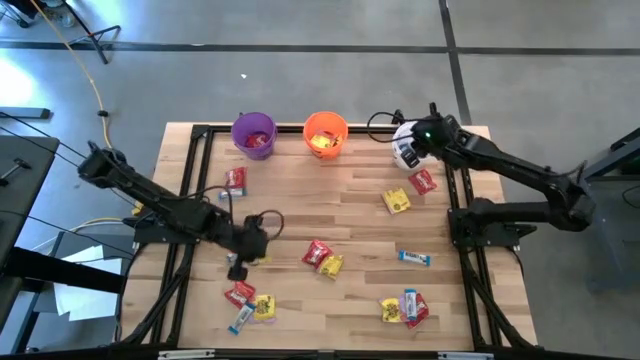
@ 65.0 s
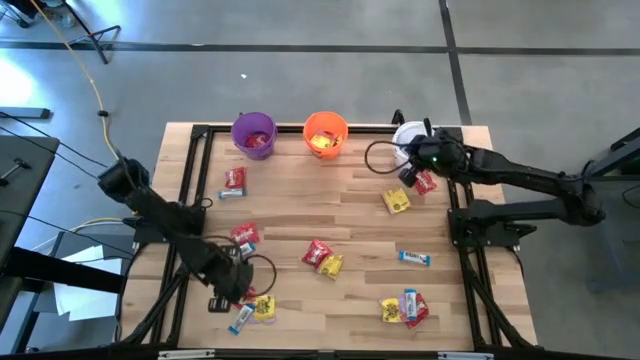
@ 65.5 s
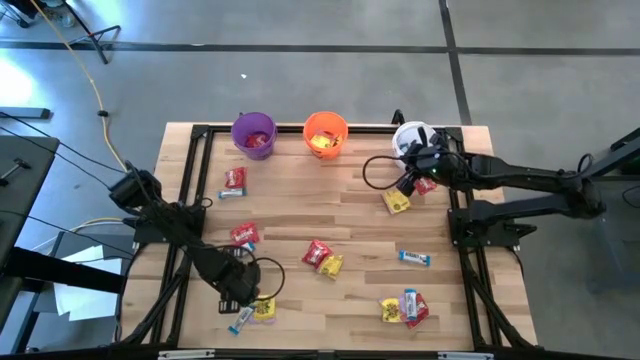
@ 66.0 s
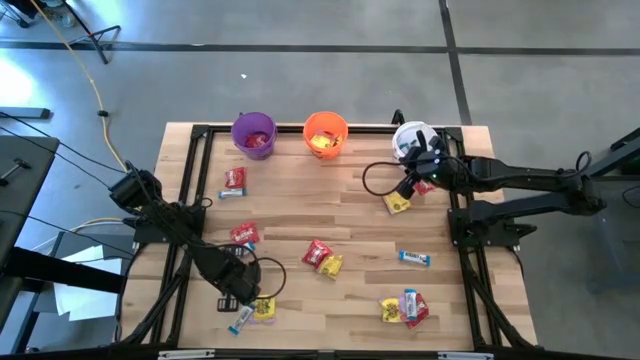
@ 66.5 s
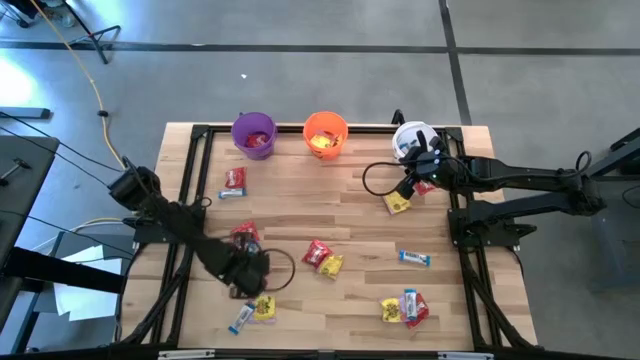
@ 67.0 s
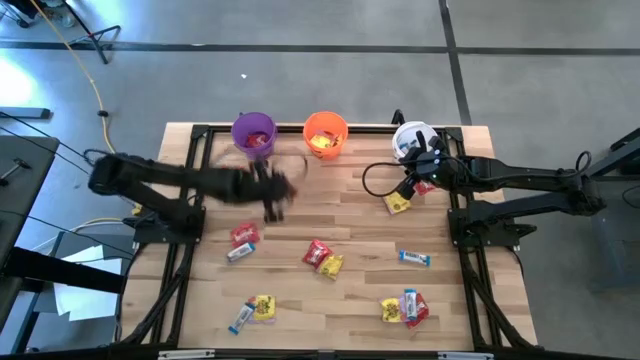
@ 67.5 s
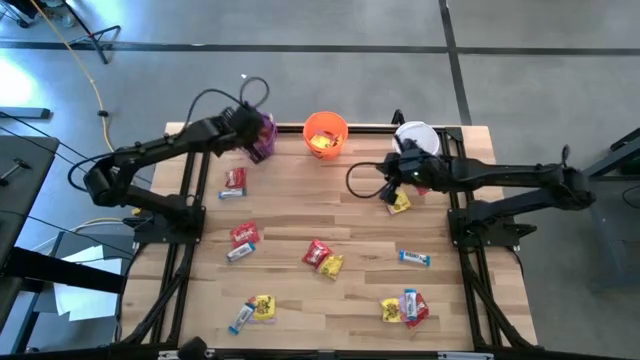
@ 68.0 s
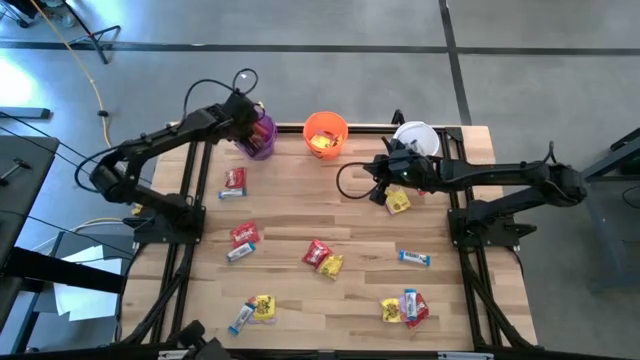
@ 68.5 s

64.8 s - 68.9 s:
Task: Sort candy
Put the red candy into the violet bucket

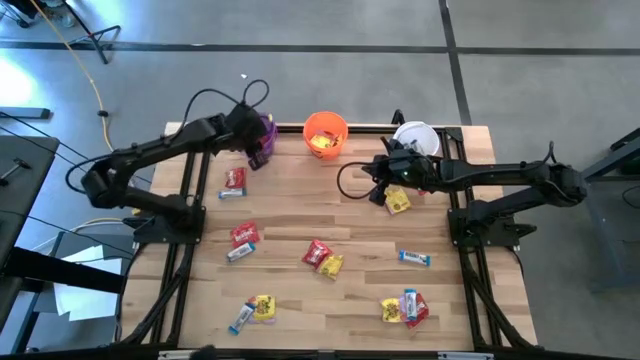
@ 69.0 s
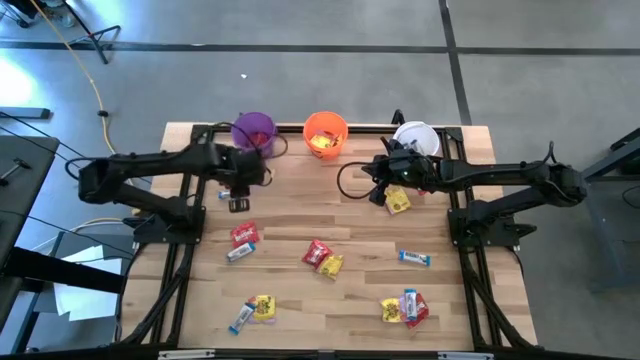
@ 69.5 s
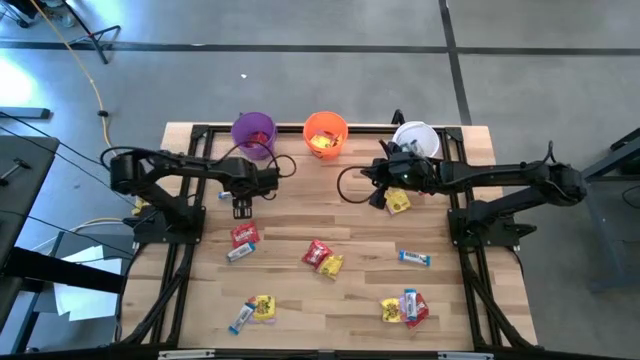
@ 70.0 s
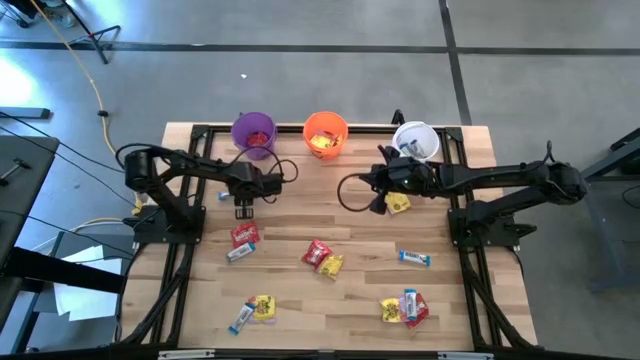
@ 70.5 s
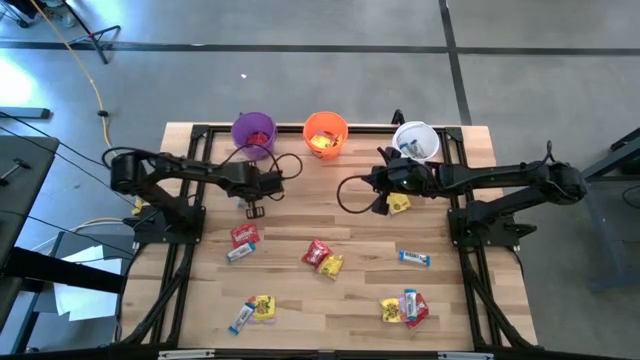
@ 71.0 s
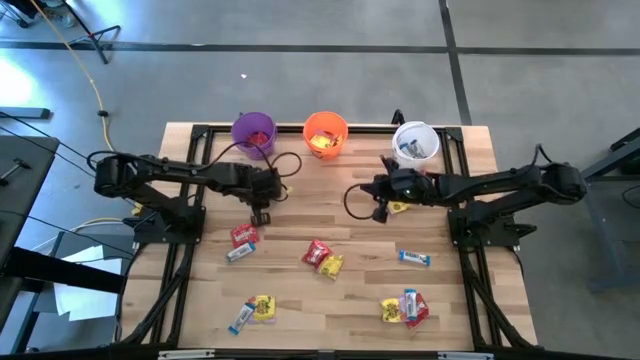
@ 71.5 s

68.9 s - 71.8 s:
Put the white chocolate bar into the white bucket

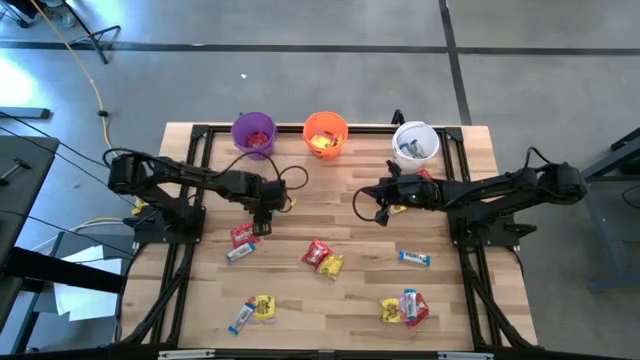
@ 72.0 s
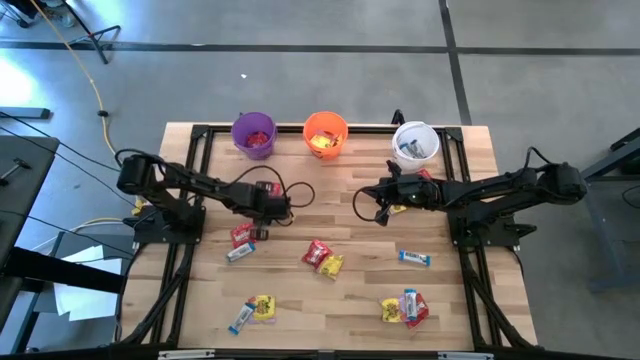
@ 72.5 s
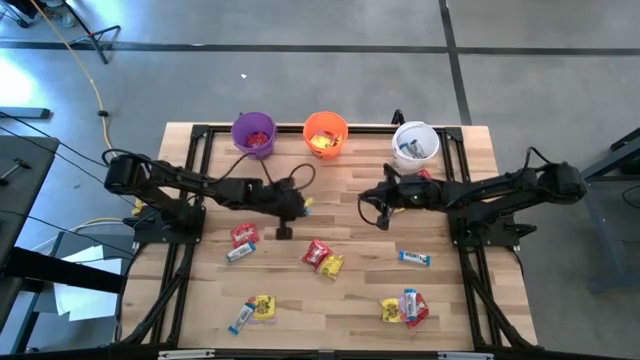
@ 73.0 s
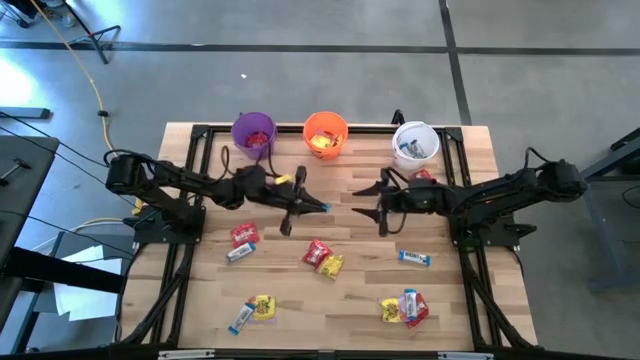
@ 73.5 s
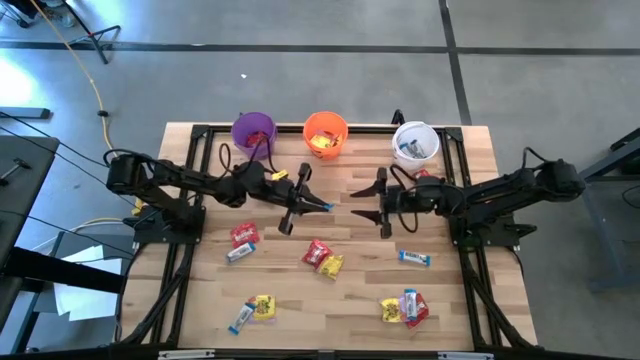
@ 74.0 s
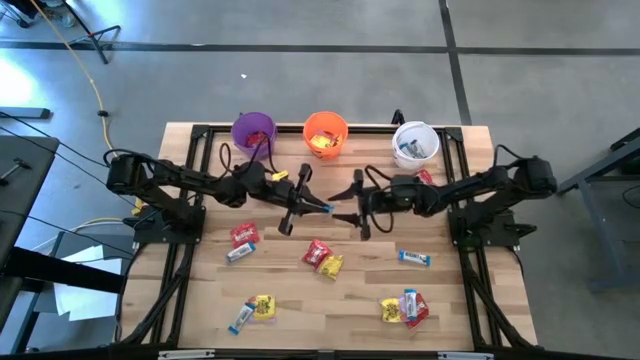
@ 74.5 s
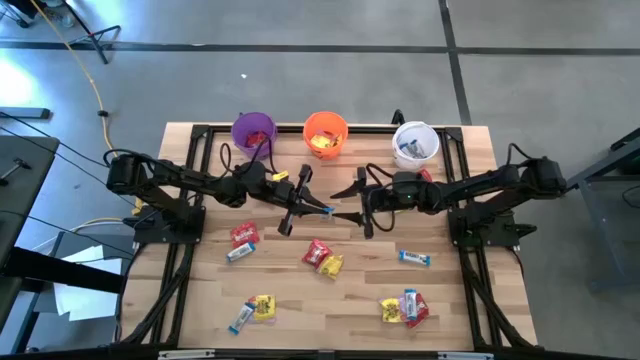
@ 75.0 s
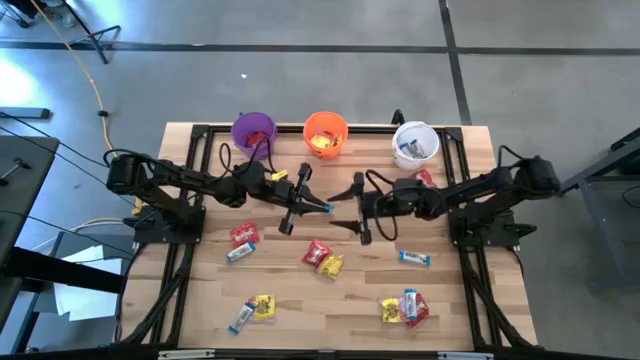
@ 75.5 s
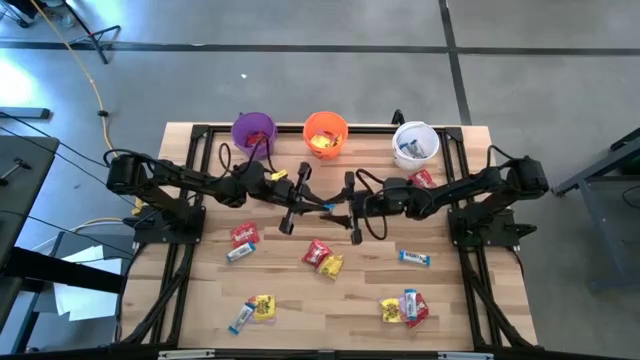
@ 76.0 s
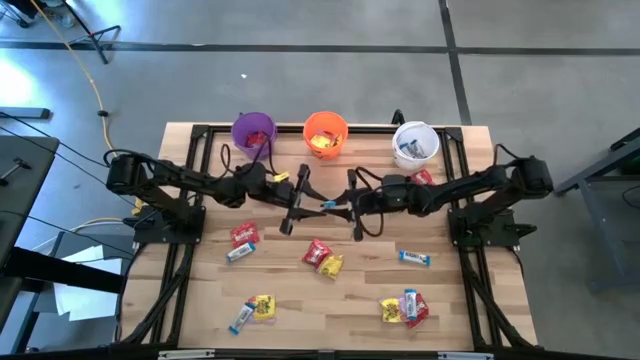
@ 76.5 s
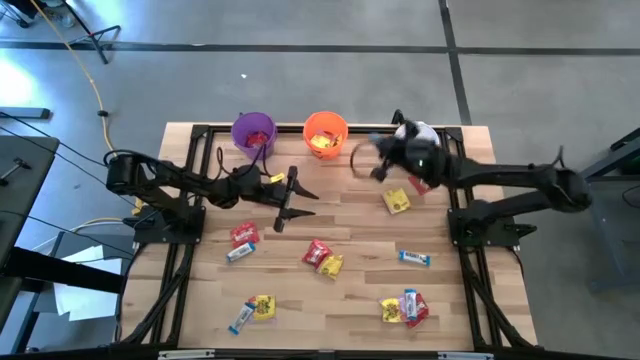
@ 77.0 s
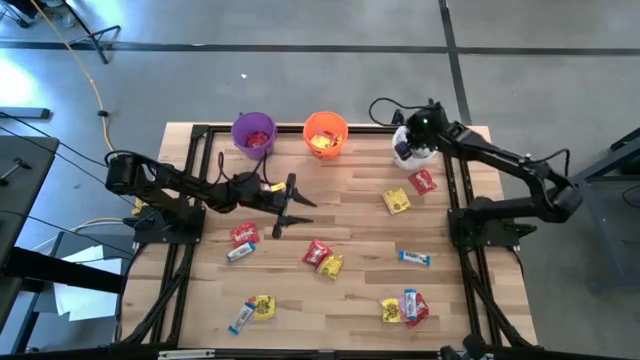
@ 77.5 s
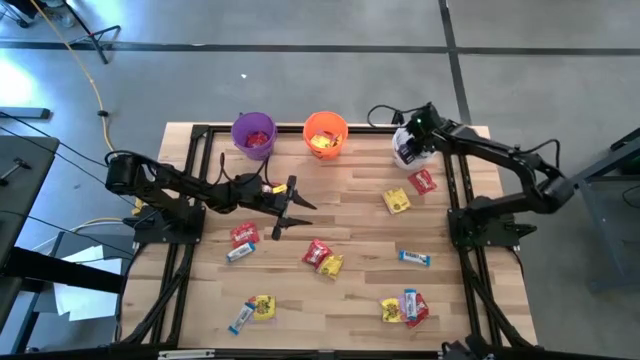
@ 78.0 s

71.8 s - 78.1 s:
Put the white chocolate bar into the white bucket

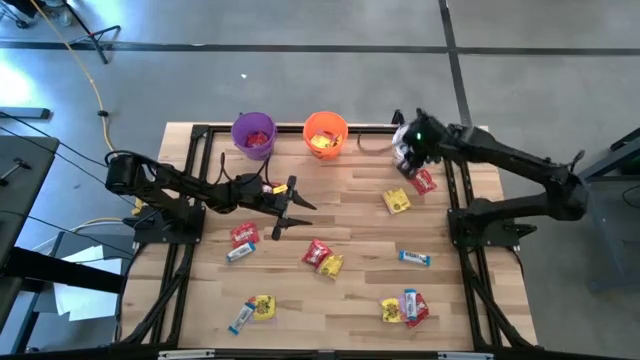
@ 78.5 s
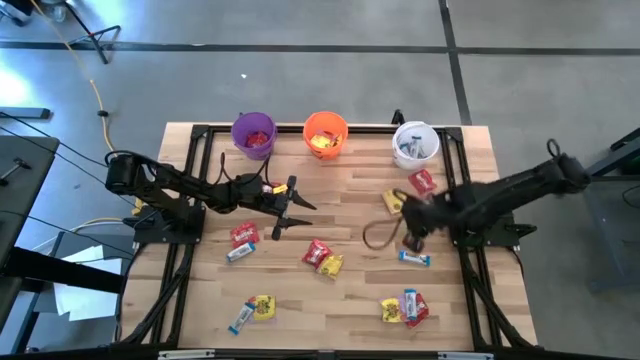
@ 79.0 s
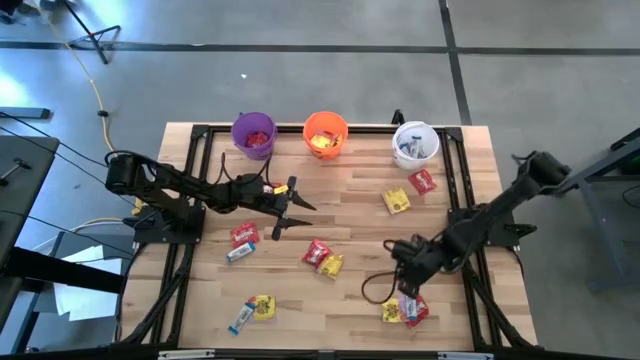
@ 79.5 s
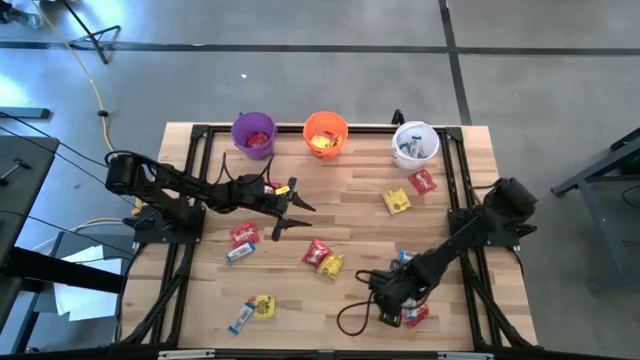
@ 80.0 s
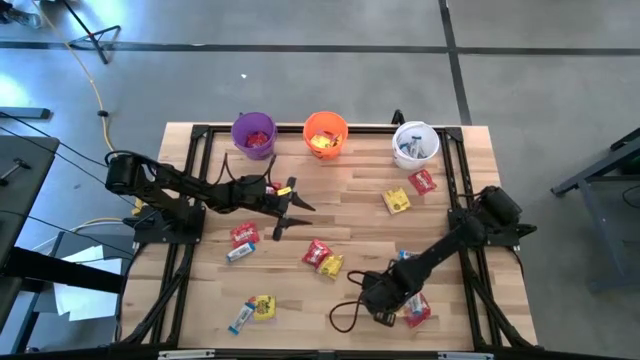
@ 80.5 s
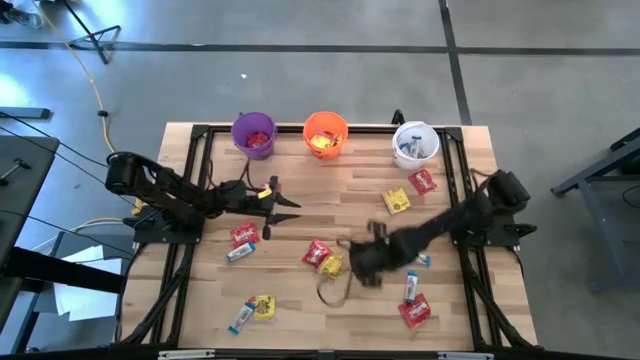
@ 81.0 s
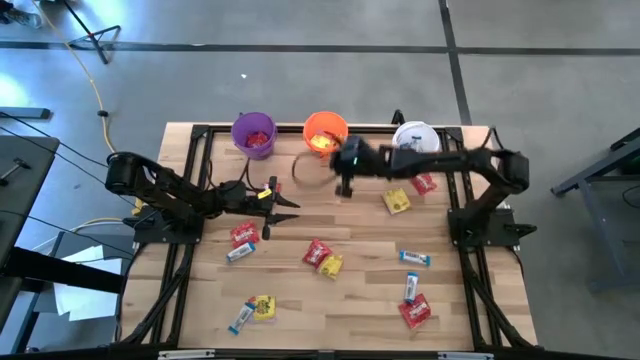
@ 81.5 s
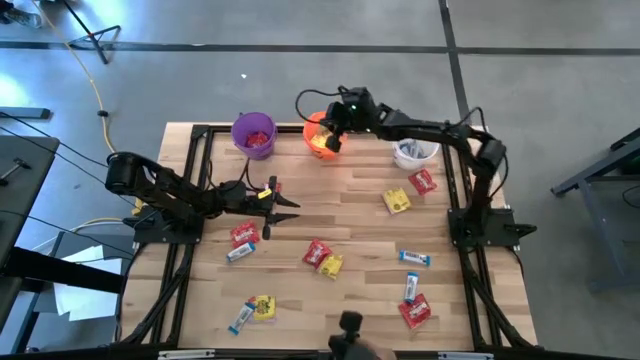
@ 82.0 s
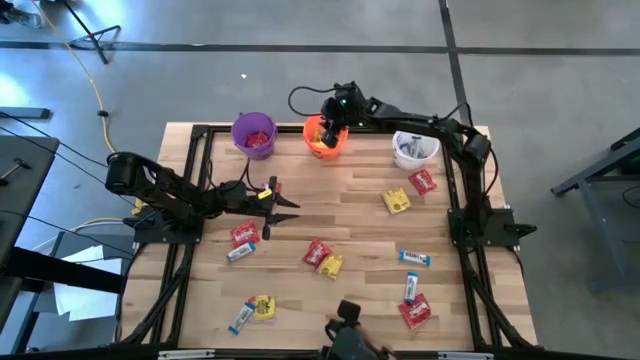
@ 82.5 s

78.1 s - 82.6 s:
Put the yellow candy into the orange bucket

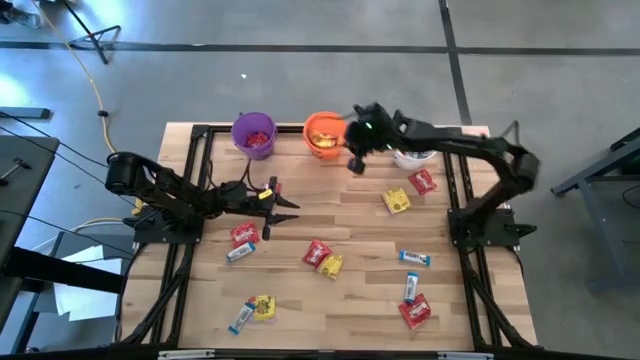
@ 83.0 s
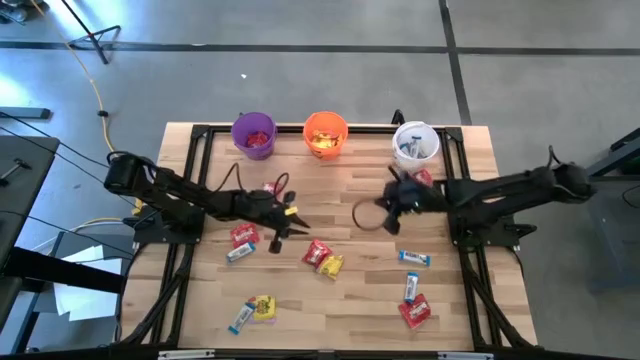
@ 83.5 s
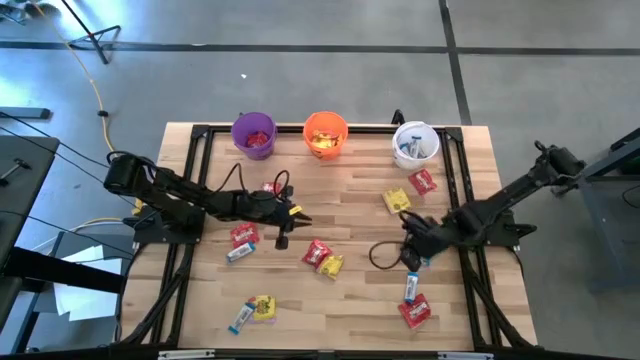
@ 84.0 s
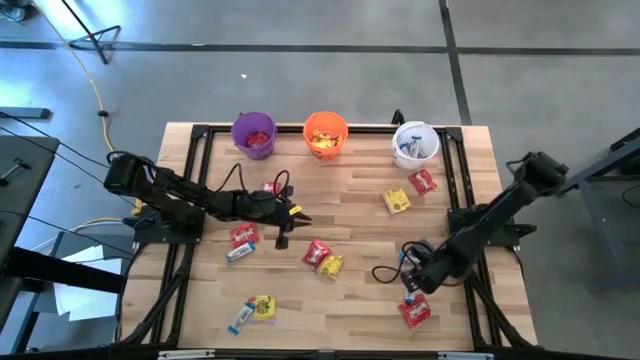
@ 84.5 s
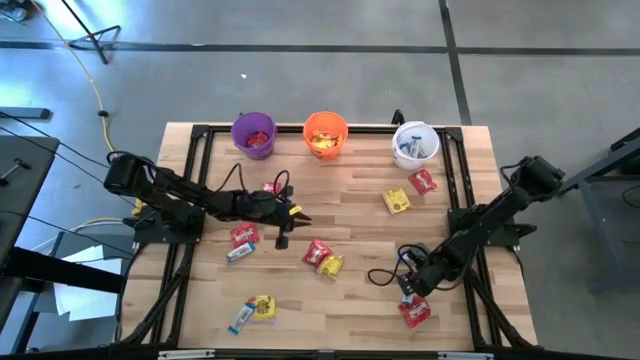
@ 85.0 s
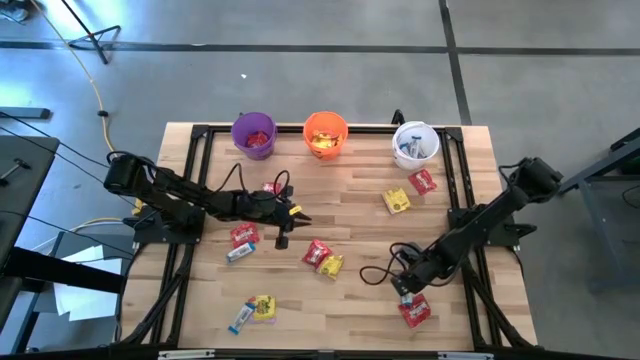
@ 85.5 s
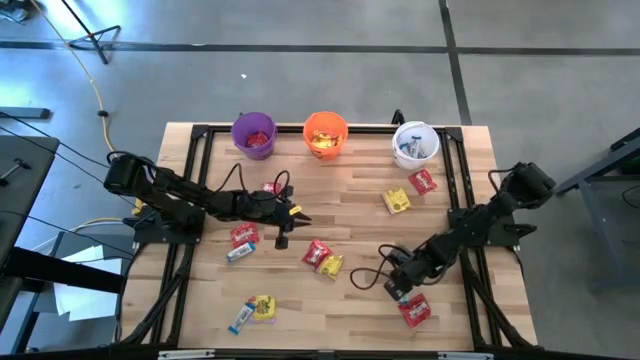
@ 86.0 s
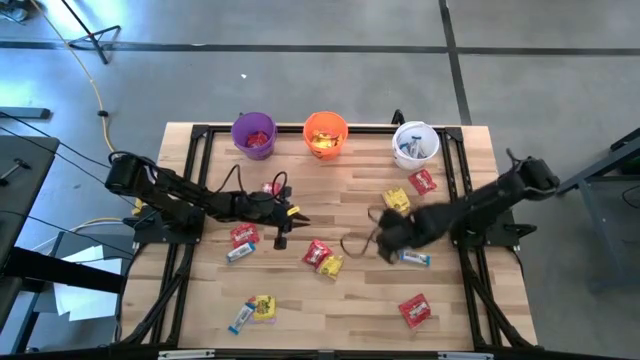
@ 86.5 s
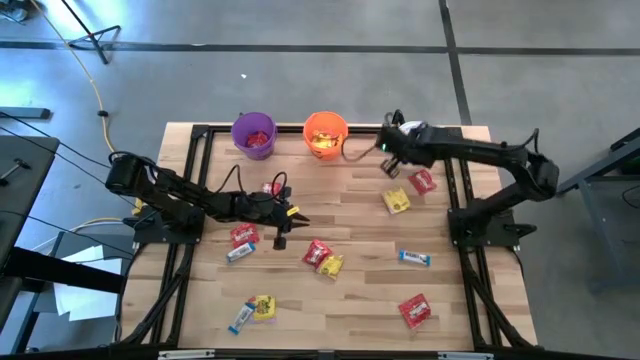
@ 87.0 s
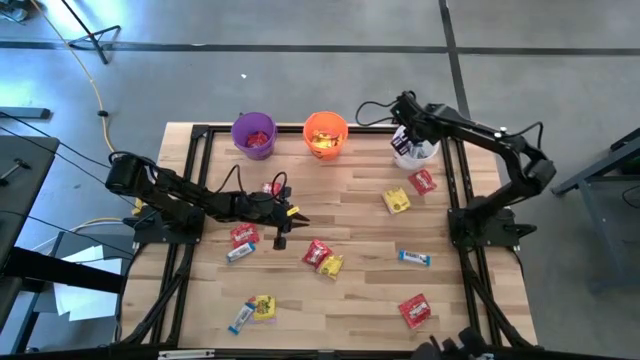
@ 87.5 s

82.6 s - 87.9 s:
Put the white chocolate bar into the white bucket
